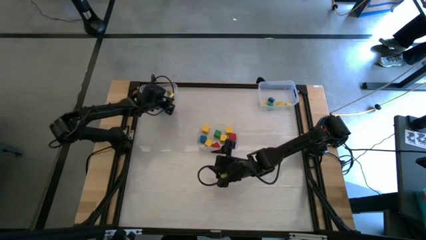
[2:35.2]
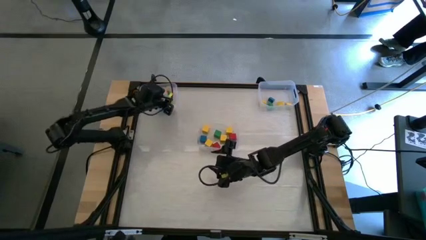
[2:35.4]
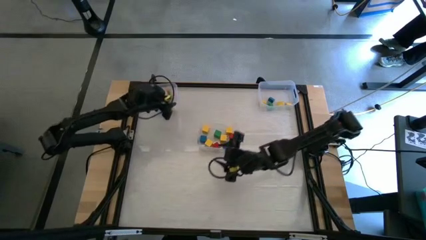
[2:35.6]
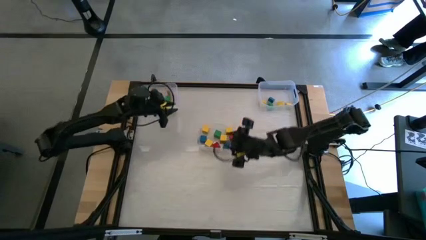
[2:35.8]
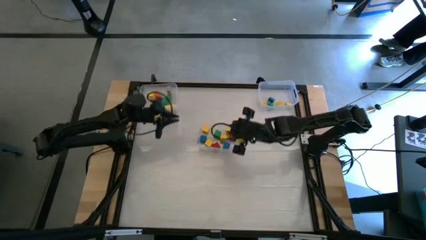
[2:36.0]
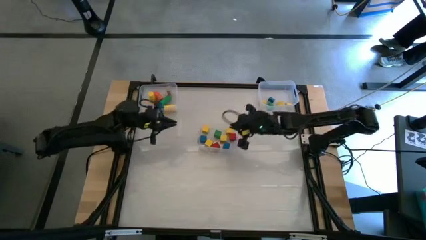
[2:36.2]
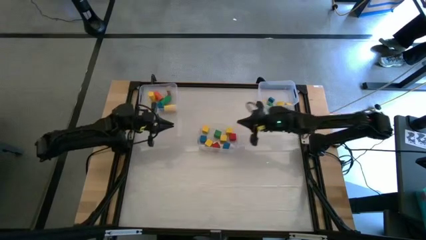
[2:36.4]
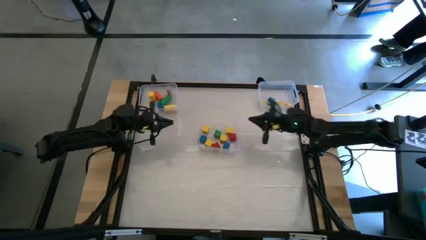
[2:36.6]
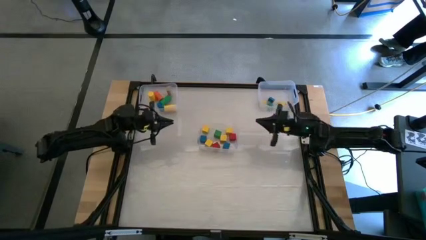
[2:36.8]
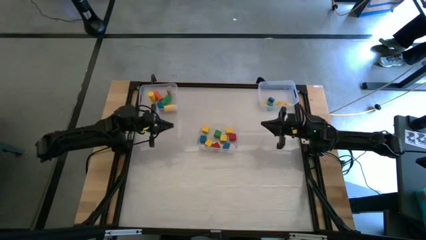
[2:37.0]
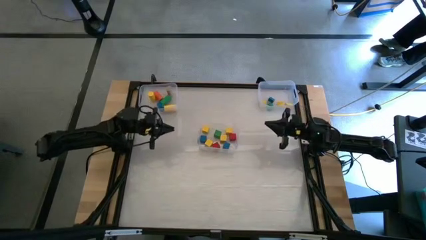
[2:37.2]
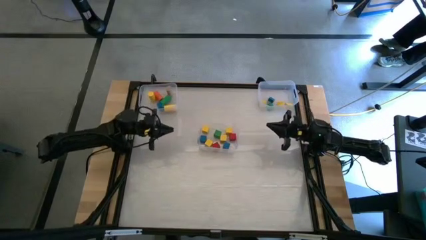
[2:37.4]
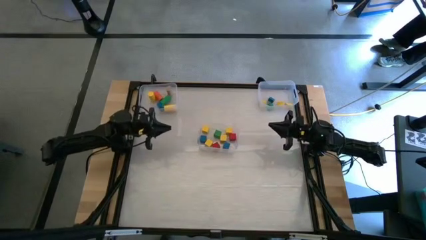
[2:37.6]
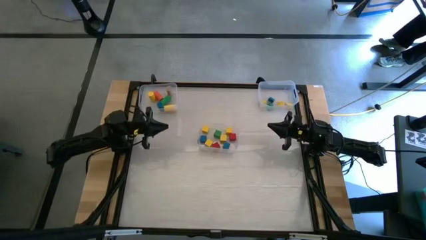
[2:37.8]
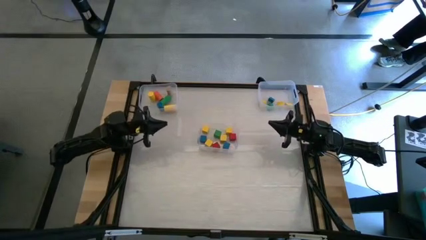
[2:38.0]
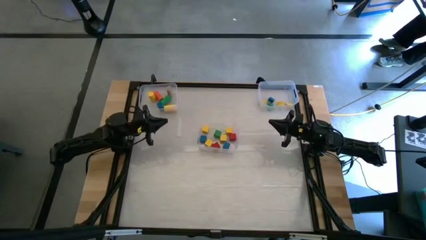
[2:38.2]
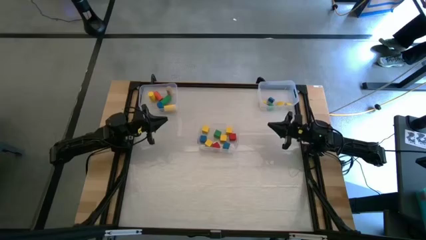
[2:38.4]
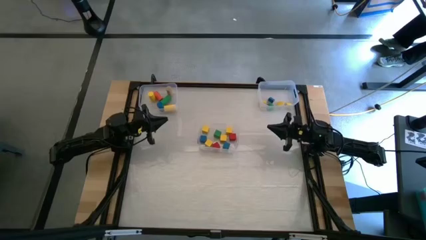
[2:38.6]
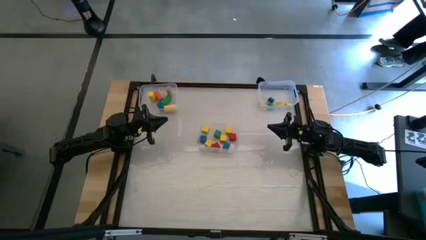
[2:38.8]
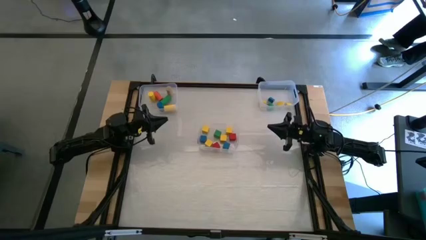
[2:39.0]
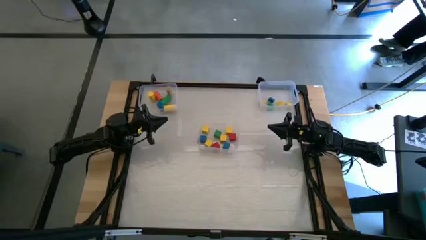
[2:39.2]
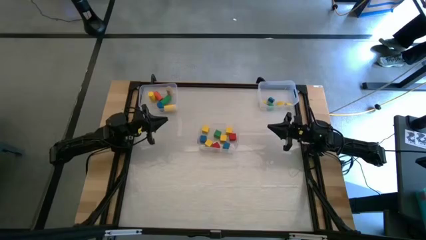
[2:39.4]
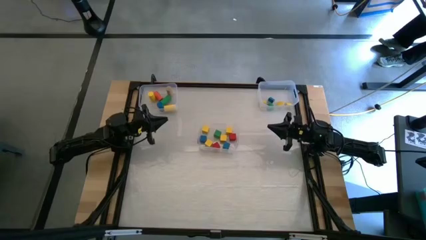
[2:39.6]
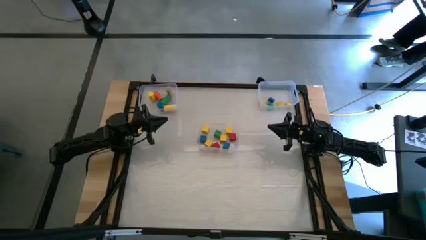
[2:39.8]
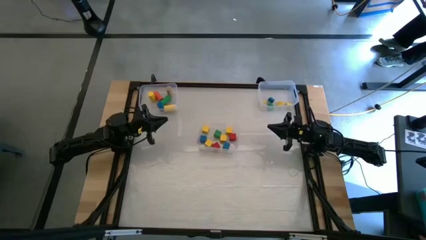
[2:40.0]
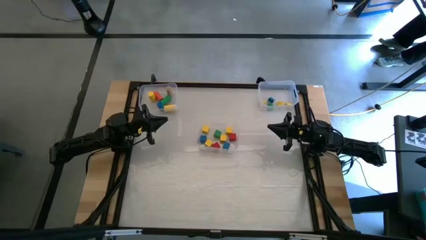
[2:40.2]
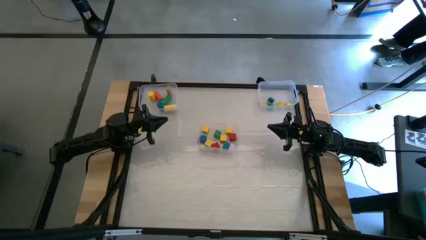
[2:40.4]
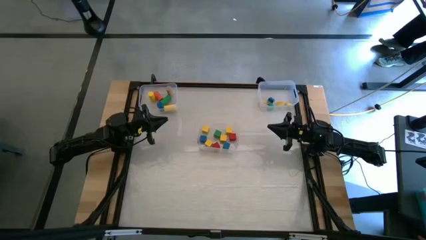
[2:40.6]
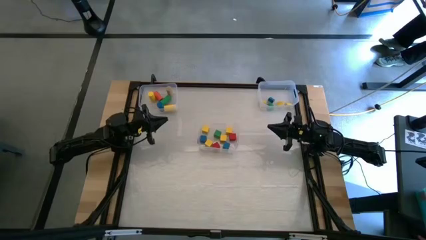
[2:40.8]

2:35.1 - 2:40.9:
Task: Sort blocks by size
Return to Home Position

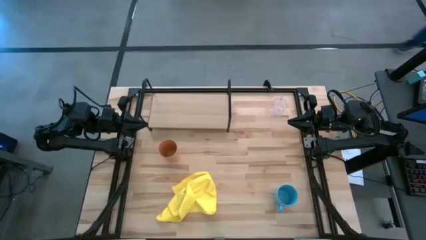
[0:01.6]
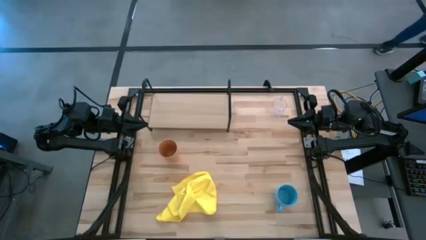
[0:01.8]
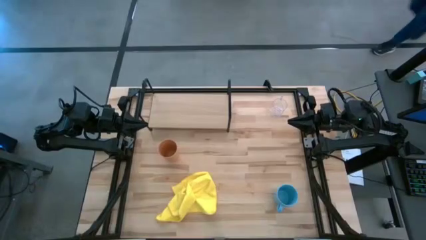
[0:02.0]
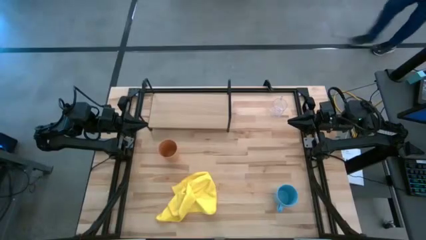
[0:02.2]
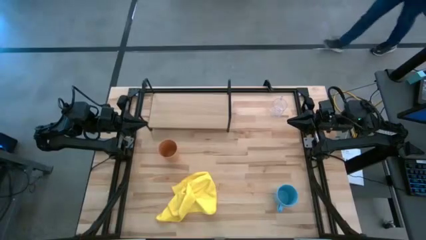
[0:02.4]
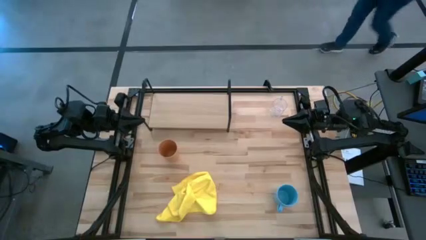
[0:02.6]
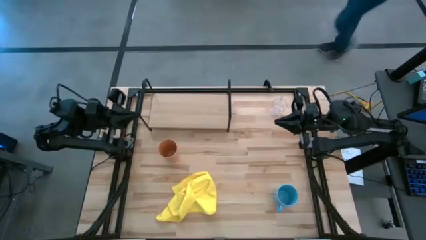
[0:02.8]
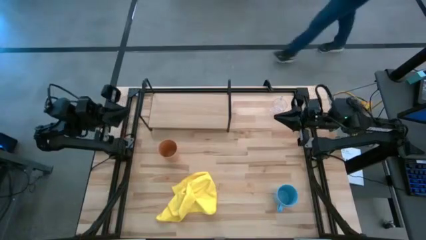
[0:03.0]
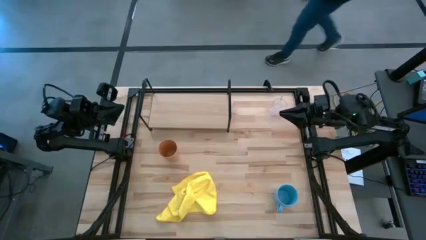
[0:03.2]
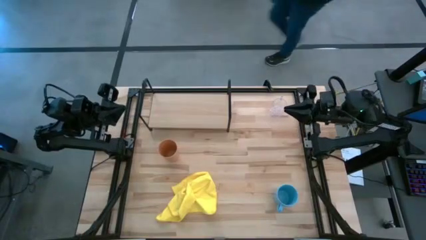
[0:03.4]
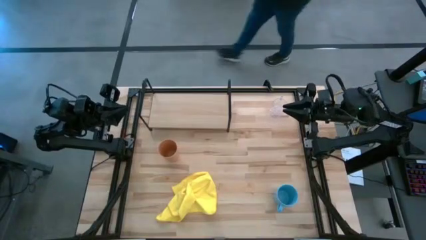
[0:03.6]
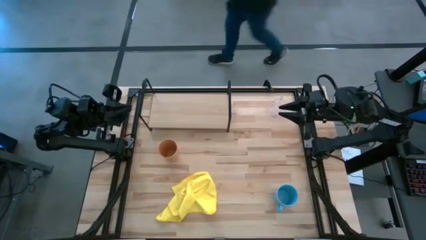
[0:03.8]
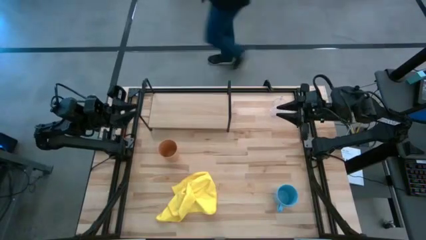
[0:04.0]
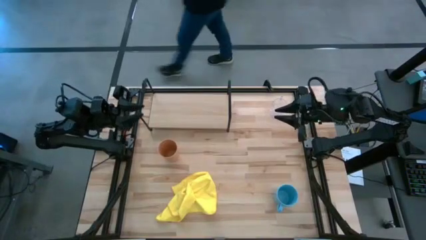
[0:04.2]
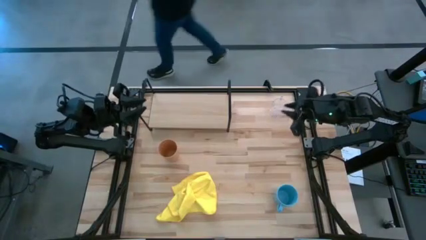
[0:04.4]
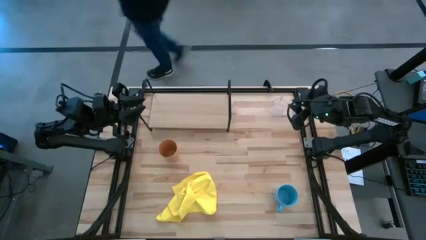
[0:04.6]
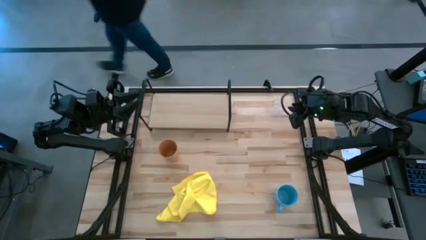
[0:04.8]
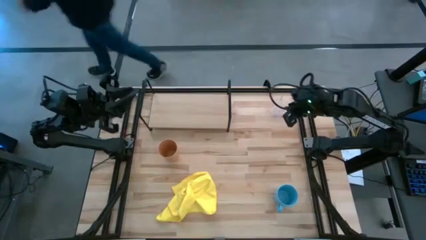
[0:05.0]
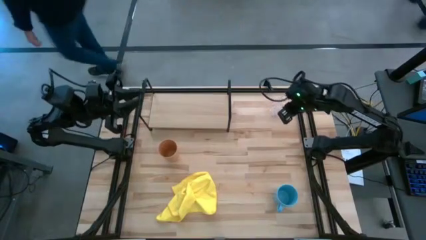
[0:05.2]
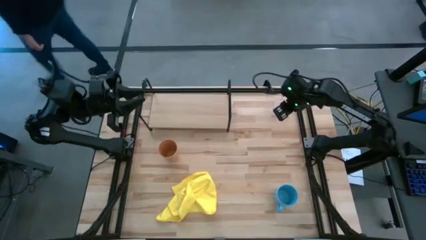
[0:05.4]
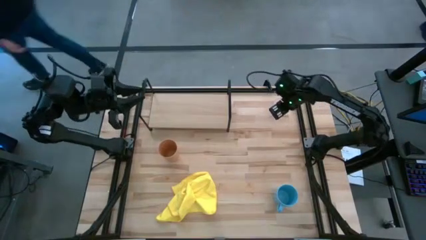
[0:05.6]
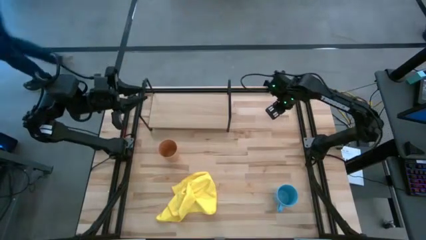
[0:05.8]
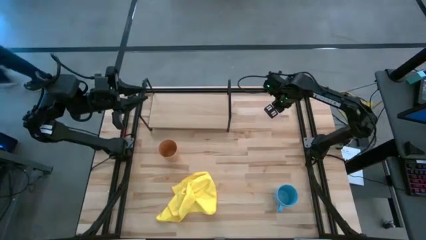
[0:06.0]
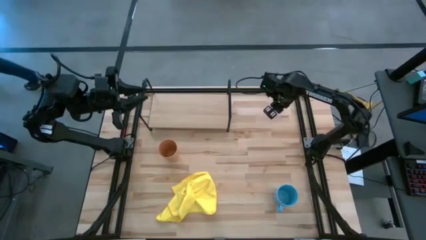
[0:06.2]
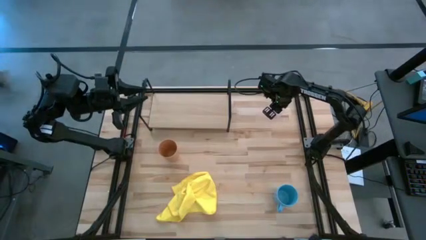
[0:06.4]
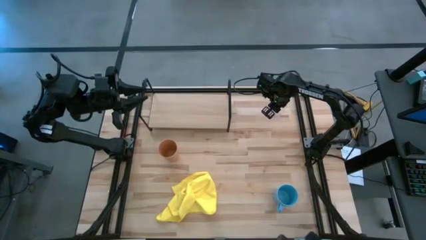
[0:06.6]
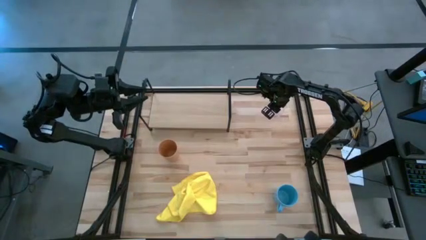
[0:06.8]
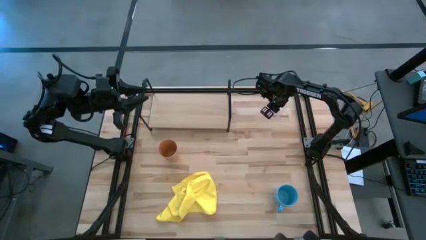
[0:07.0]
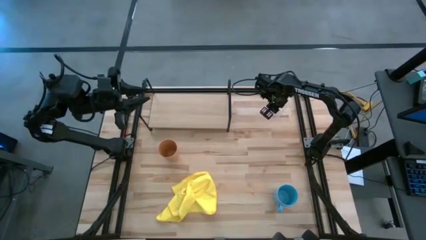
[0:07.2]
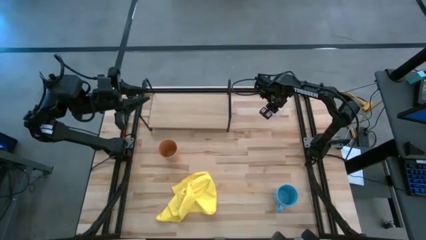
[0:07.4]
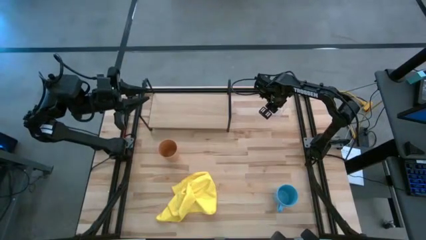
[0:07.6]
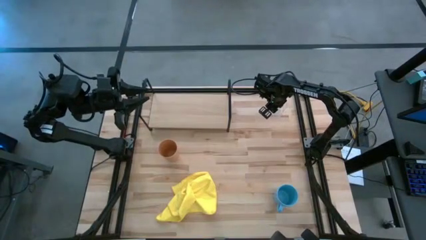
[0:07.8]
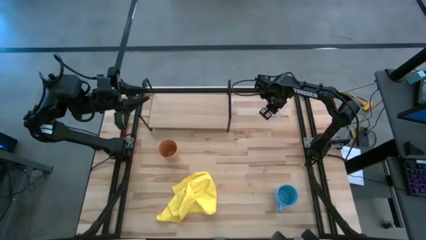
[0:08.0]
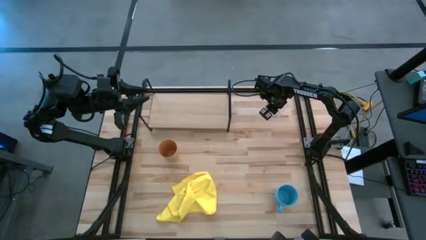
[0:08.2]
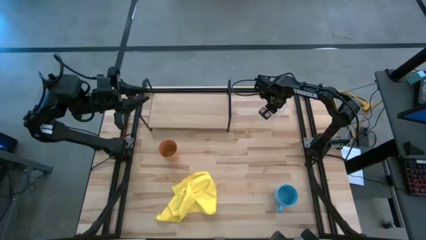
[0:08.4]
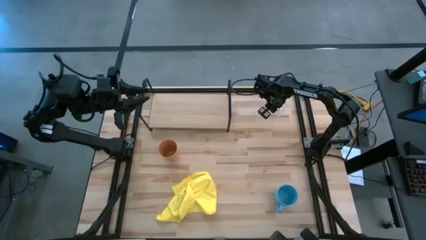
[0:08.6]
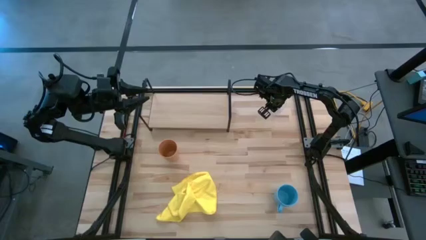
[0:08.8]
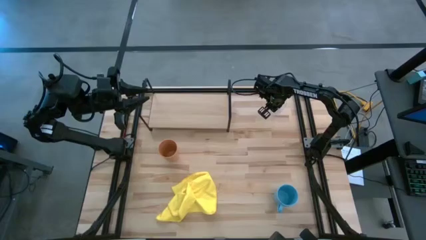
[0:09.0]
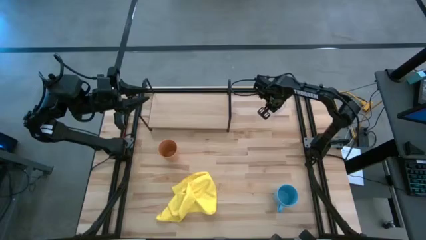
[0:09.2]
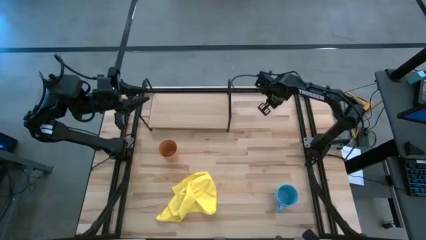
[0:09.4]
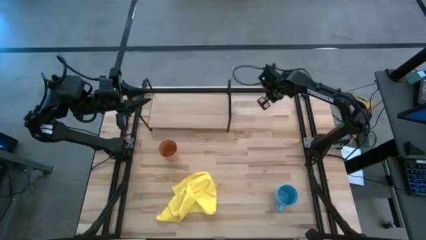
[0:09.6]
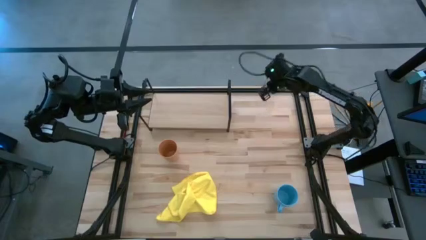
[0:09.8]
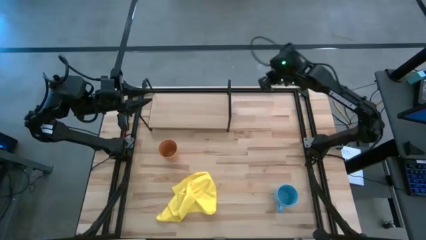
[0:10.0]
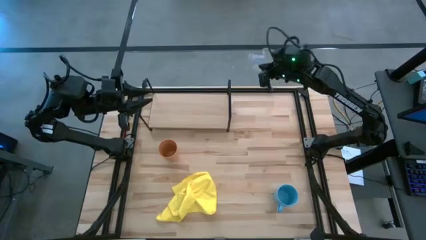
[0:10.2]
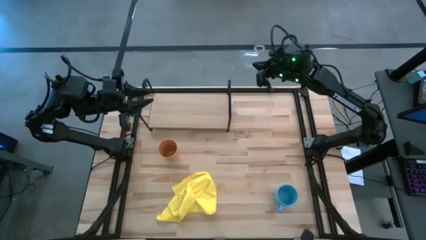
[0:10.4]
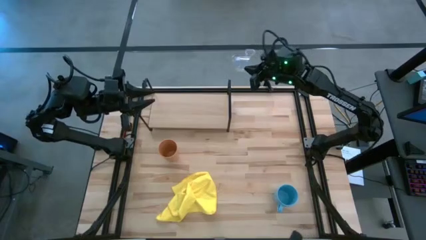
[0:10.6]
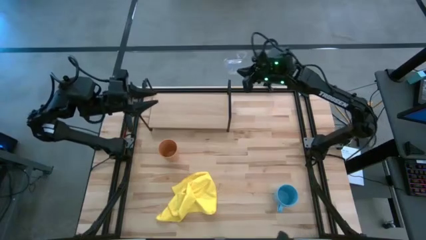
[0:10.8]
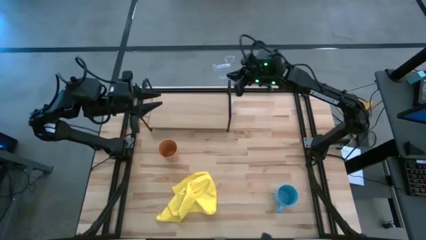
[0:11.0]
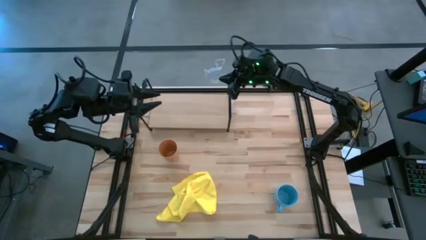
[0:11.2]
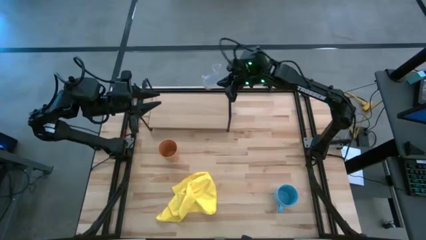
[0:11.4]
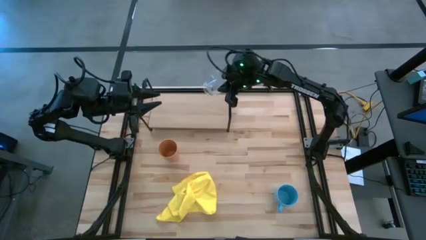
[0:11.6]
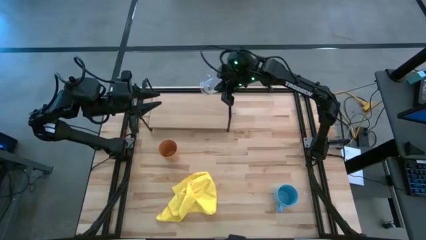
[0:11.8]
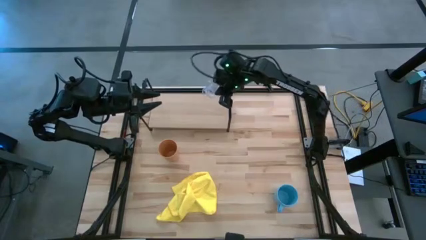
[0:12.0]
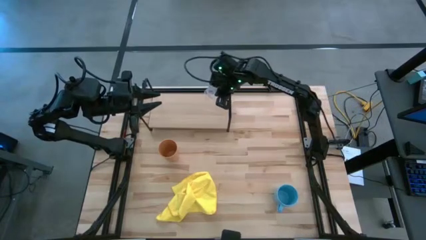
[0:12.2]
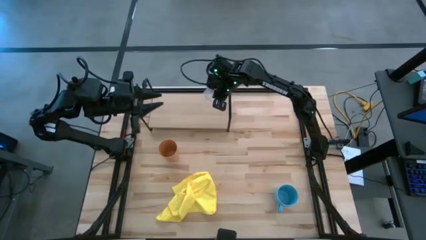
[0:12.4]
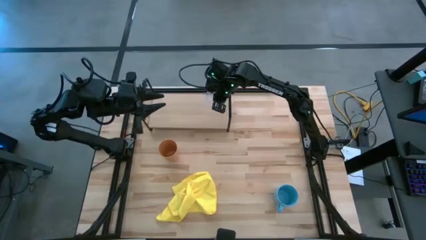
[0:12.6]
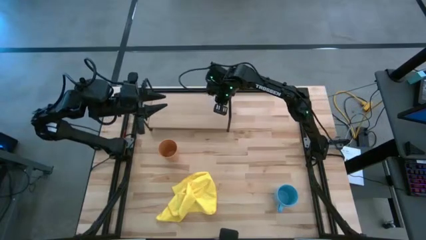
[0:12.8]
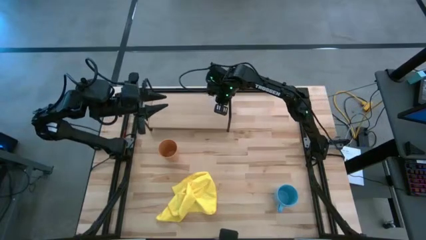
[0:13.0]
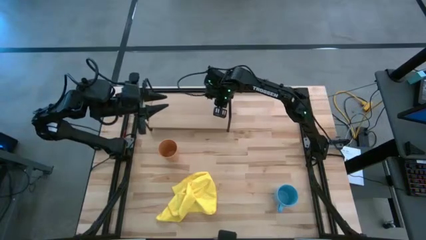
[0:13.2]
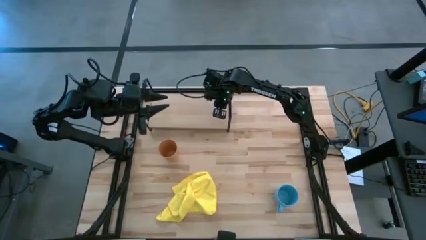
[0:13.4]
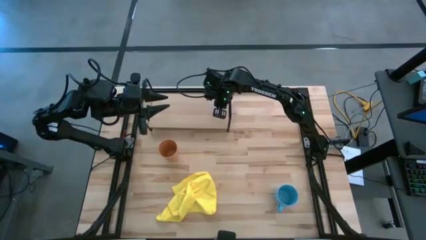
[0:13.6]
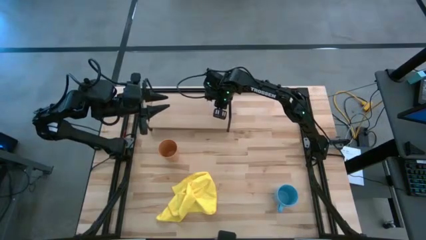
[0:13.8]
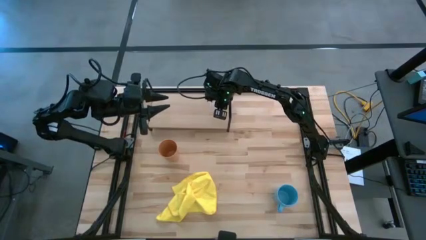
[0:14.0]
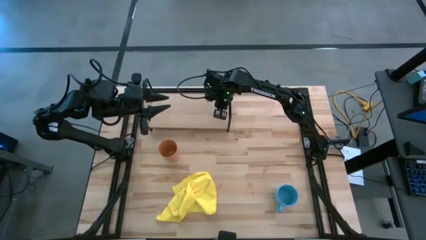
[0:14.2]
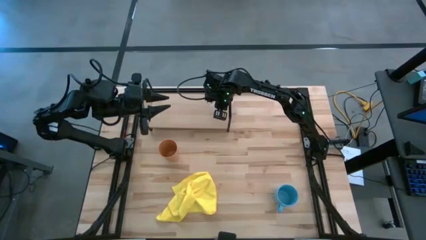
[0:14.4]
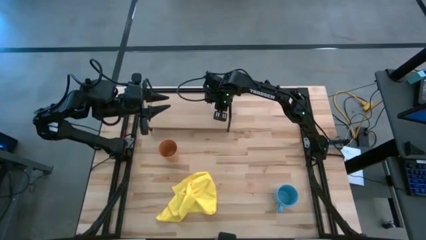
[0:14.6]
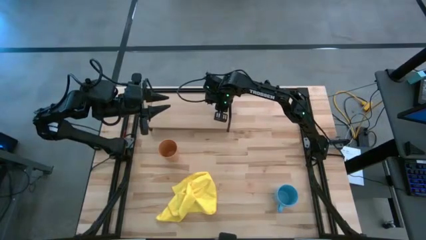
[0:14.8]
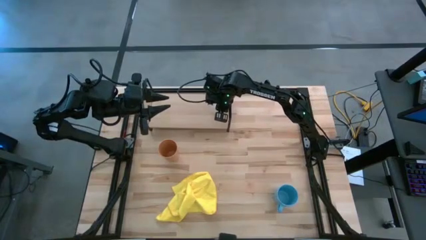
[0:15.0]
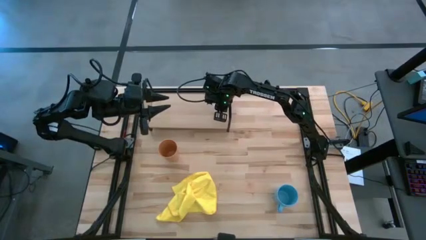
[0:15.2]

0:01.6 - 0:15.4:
Task: Stack small to large cups/mugs on shelf
Put the transparent mug on the shelf
